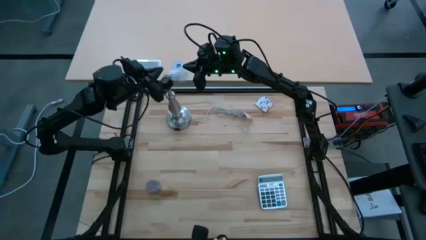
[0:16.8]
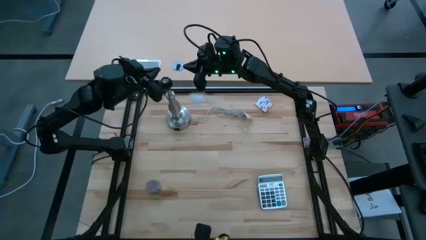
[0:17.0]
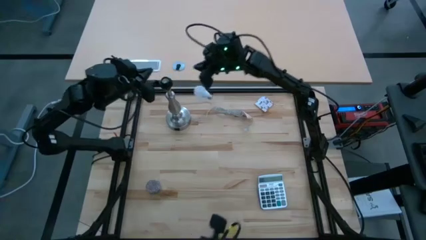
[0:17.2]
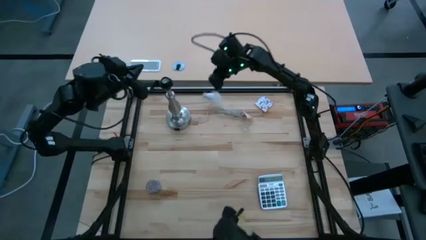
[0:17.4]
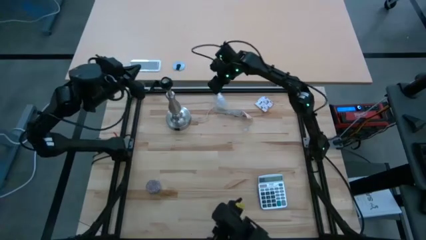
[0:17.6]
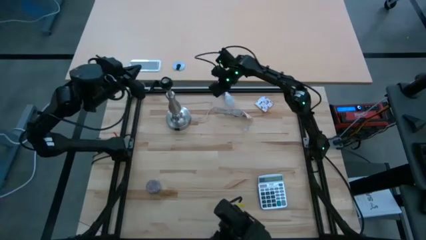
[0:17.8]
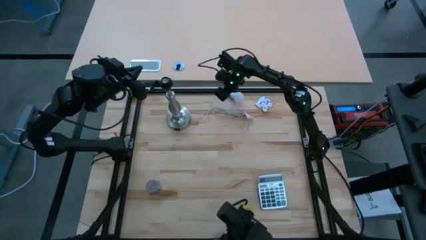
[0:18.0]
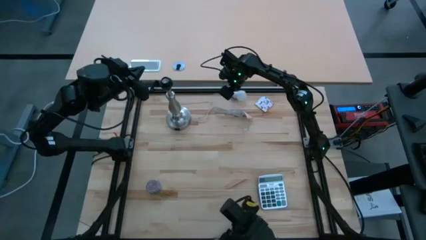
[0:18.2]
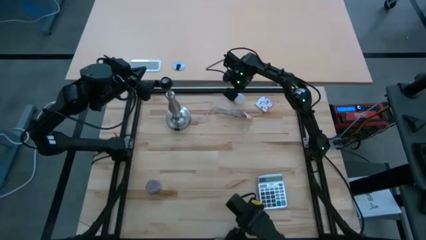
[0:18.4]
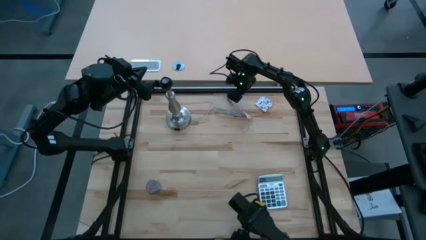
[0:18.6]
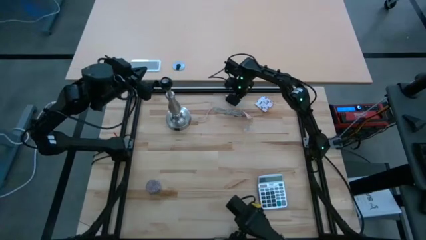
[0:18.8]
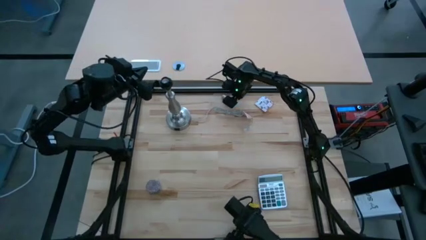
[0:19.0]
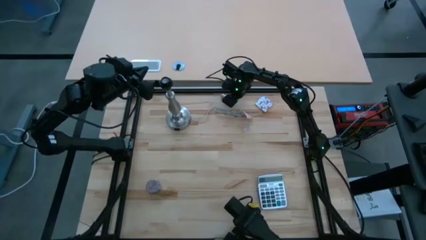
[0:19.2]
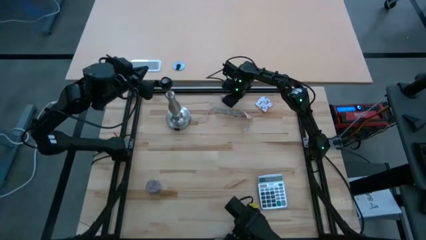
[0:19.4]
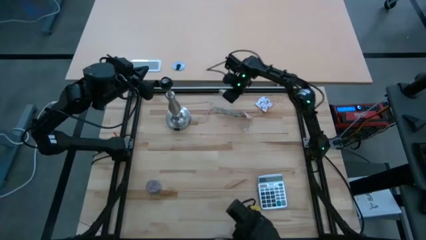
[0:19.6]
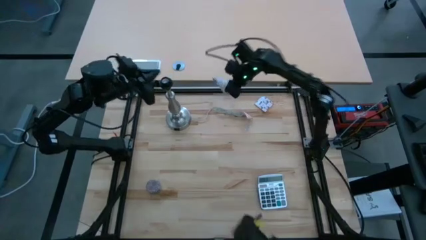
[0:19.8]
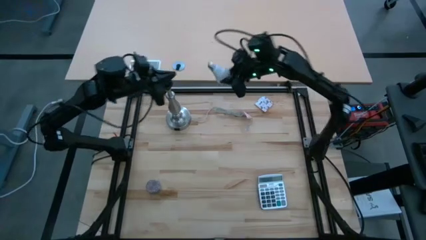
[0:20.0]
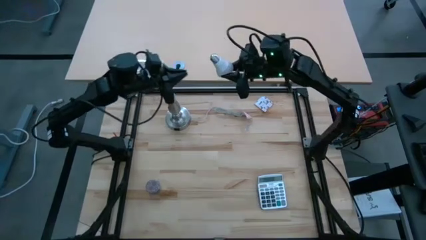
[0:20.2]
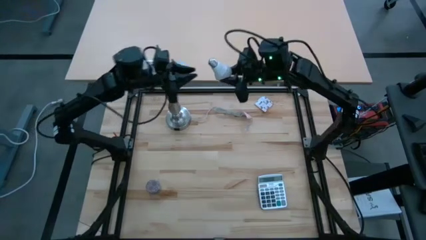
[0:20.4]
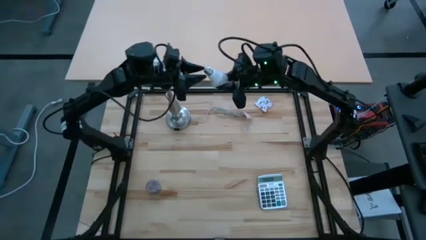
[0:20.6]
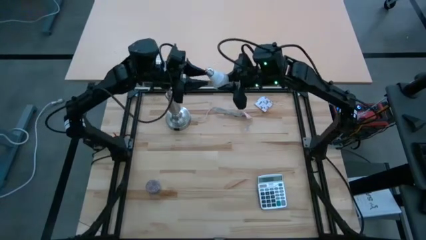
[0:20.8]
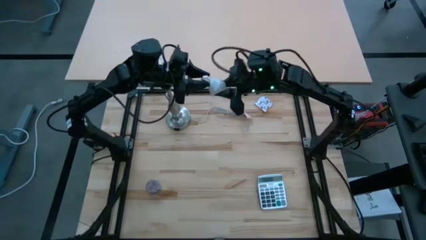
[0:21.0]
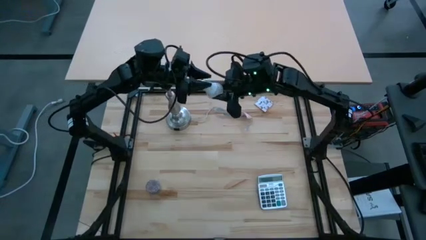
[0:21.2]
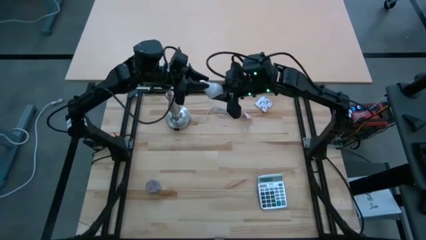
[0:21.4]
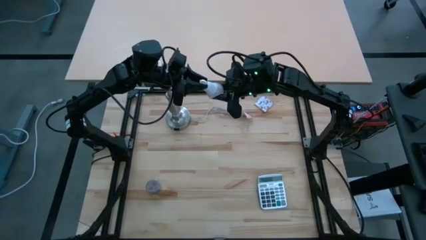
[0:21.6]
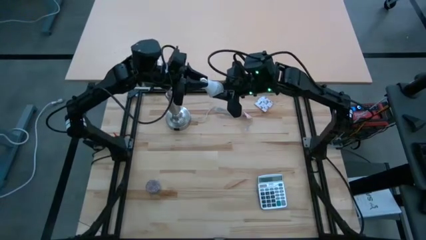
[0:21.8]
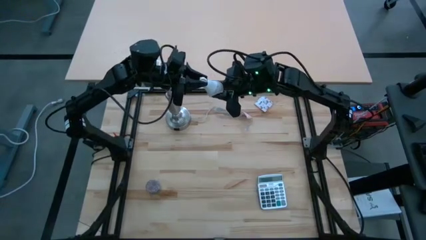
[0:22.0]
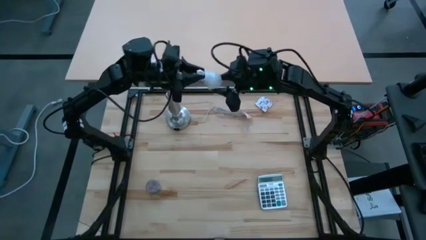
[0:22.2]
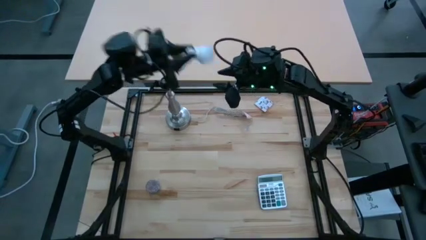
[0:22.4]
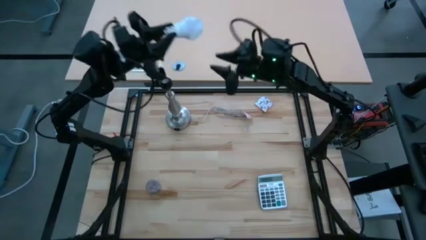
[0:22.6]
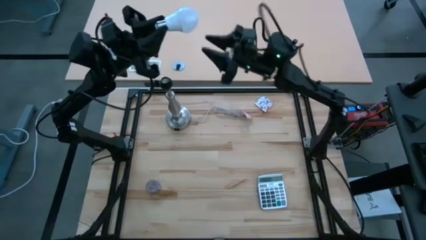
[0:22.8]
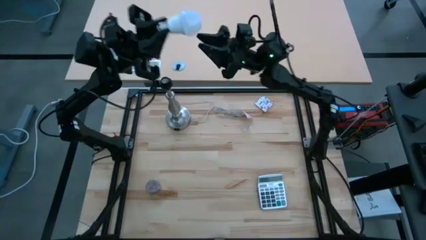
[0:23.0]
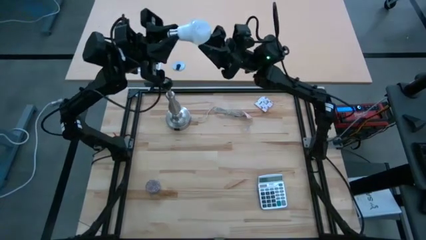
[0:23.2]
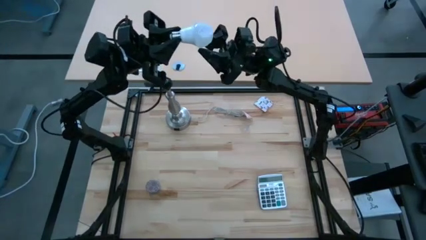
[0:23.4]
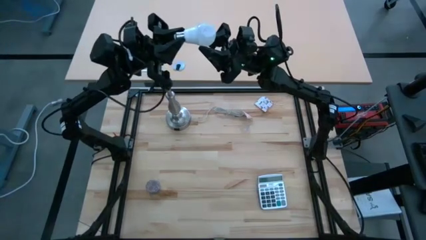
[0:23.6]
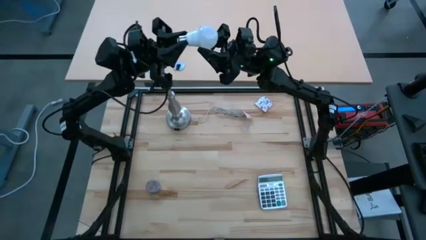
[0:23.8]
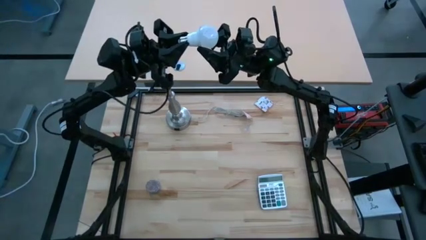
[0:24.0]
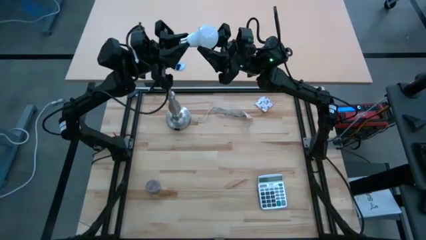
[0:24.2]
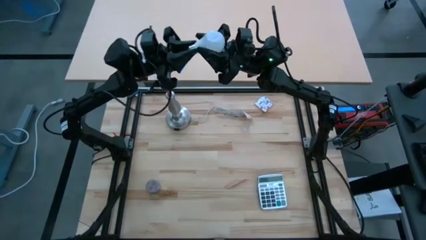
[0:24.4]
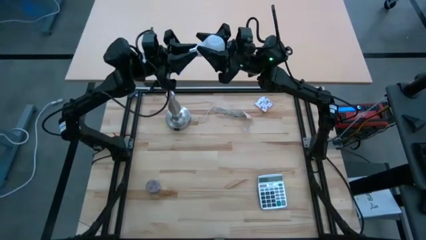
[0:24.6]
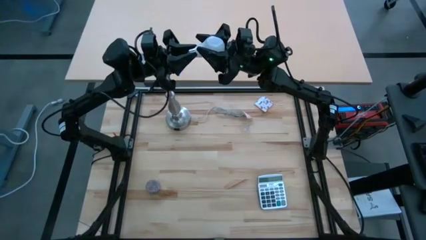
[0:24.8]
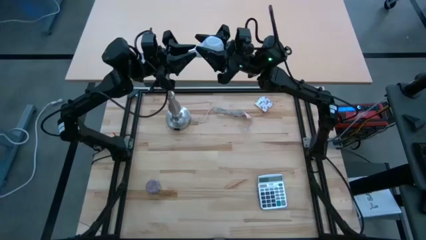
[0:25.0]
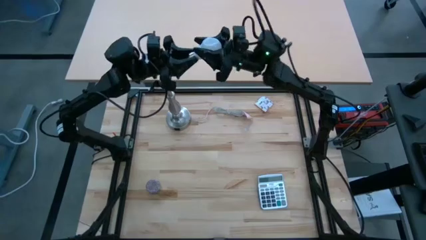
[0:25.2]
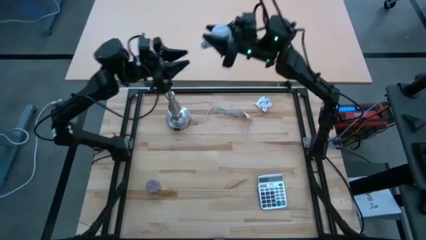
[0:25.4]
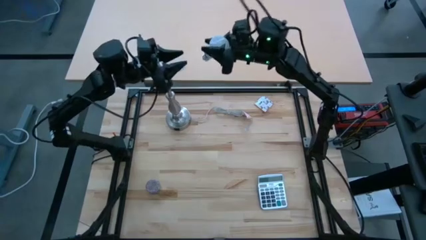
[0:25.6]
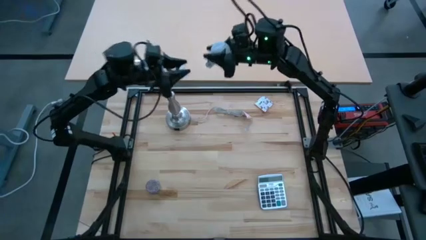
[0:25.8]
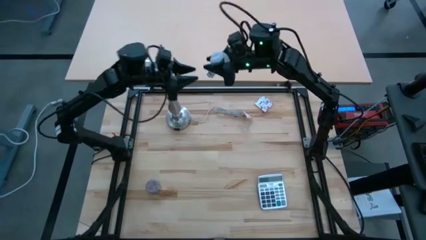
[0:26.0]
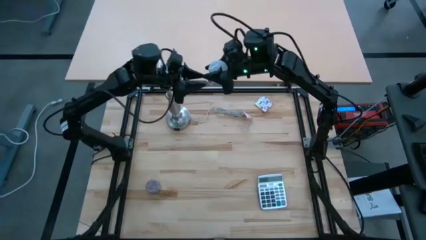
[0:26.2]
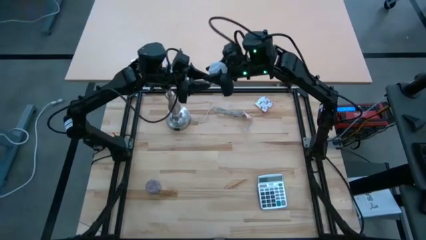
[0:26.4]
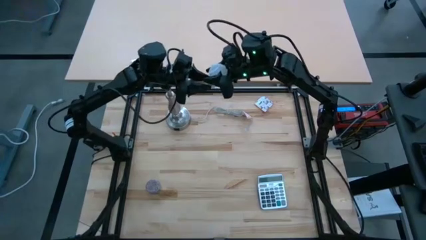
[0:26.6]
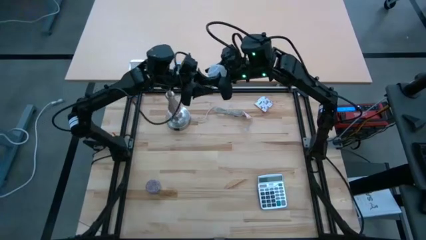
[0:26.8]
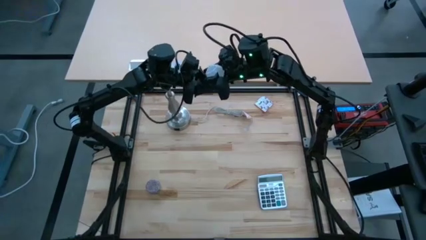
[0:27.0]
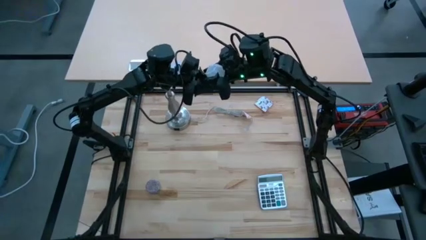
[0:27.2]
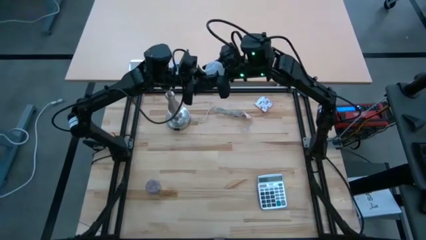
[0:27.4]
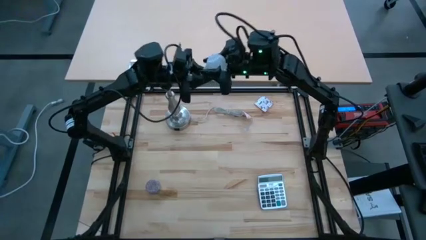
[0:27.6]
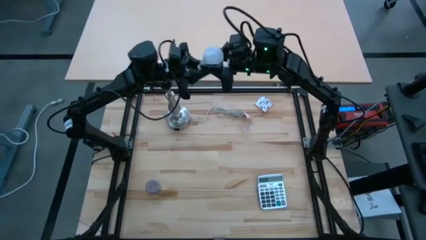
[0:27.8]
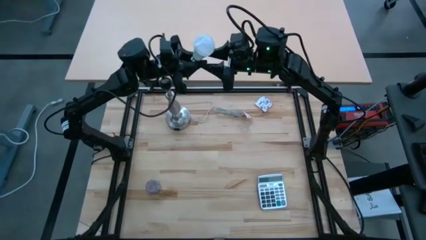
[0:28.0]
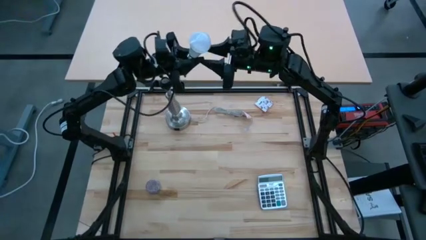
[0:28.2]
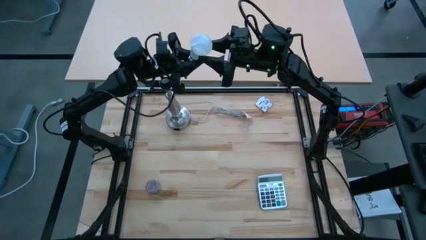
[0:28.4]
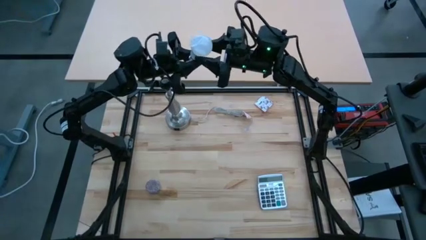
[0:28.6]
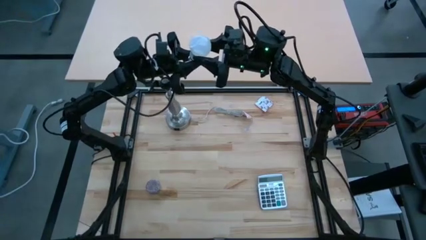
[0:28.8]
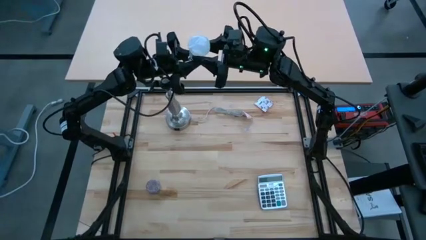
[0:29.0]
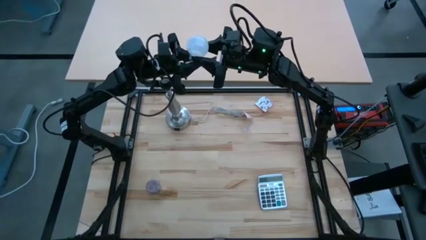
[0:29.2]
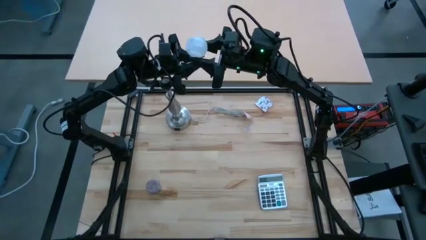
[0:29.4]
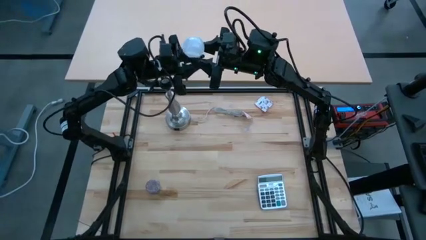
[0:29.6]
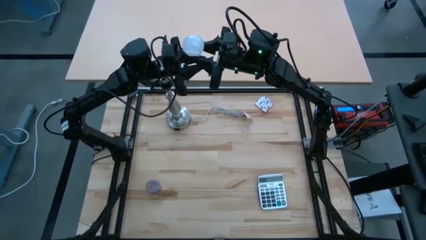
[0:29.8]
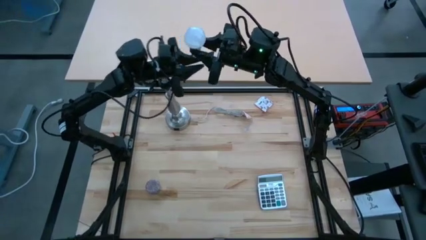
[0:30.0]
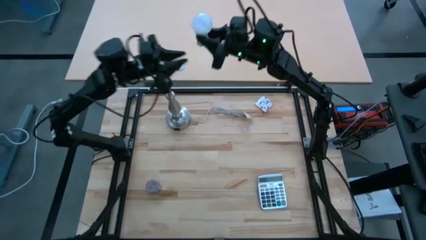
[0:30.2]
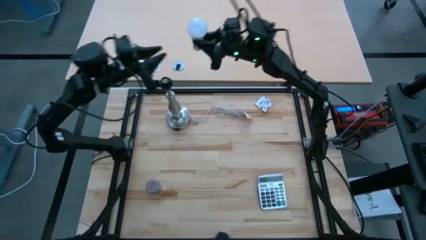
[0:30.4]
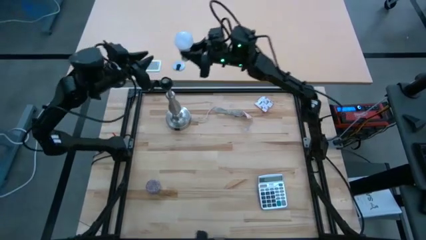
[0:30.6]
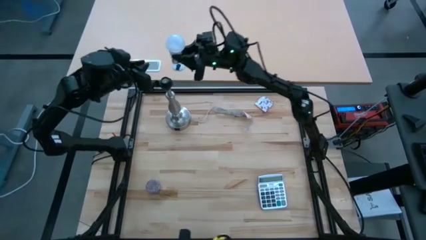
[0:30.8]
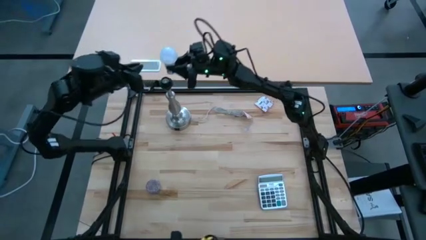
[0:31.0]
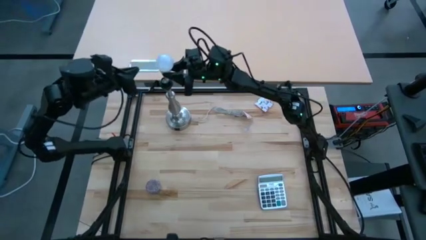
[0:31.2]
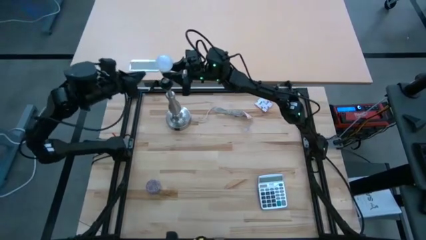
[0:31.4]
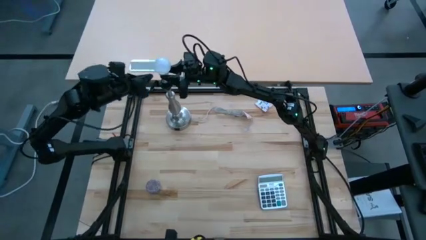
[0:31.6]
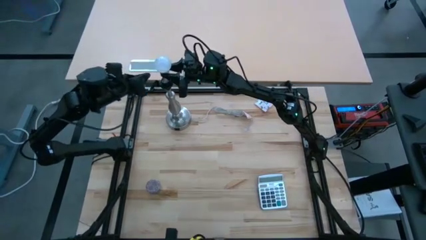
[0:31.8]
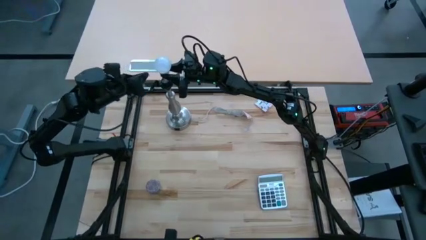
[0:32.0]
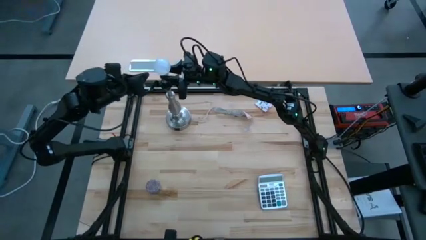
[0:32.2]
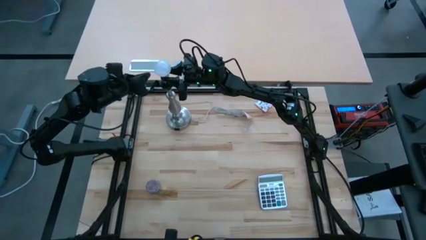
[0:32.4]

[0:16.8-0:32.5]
Task: Screw lightbulb
Insert the lightbulb into the lamp

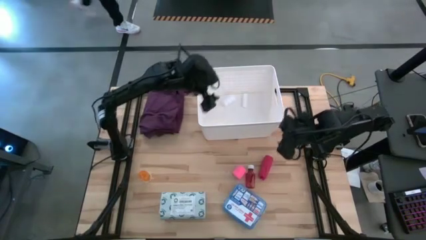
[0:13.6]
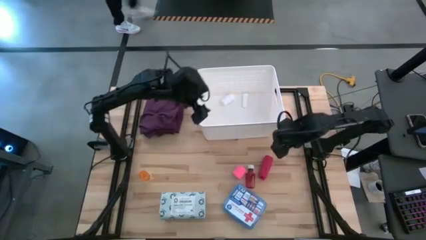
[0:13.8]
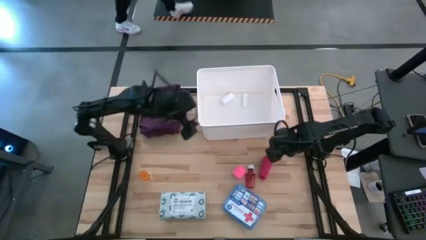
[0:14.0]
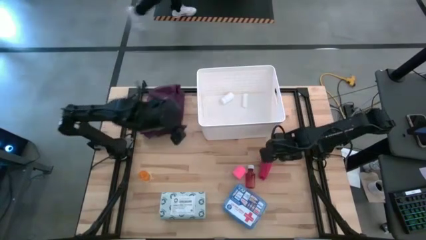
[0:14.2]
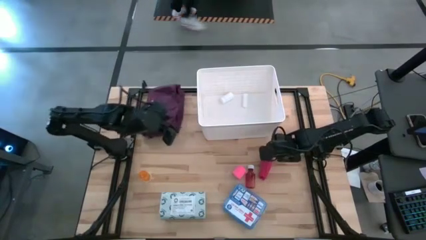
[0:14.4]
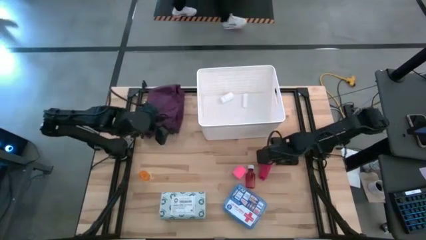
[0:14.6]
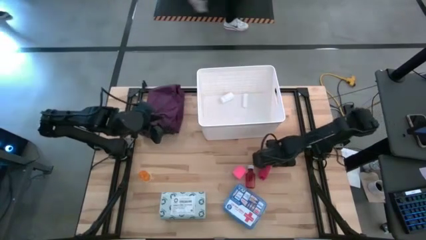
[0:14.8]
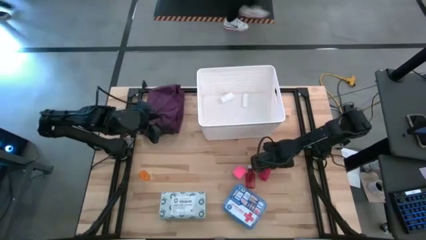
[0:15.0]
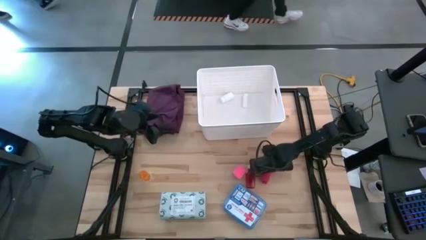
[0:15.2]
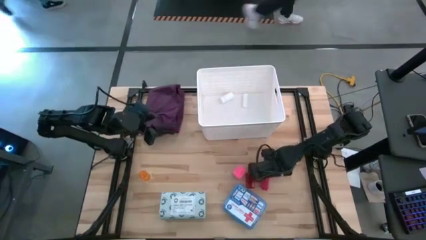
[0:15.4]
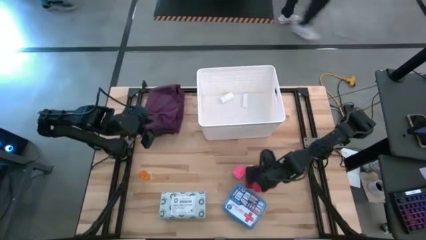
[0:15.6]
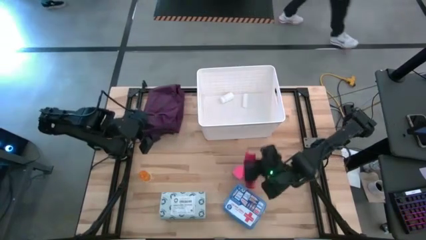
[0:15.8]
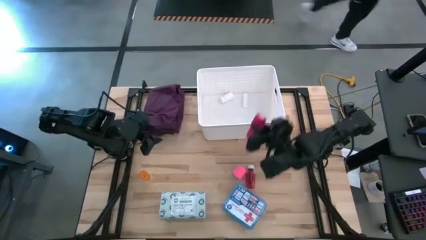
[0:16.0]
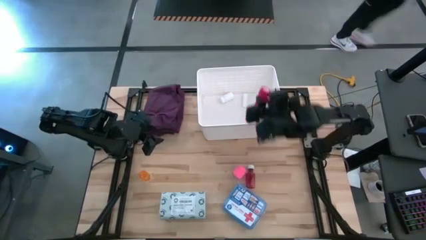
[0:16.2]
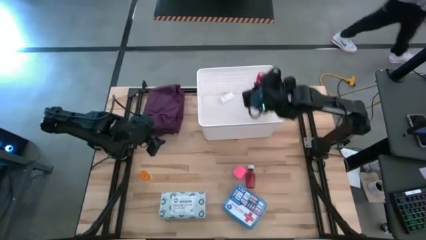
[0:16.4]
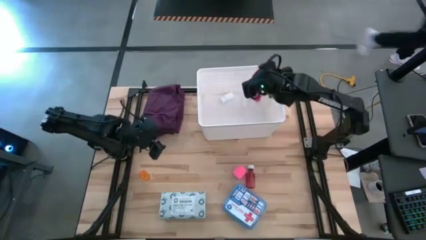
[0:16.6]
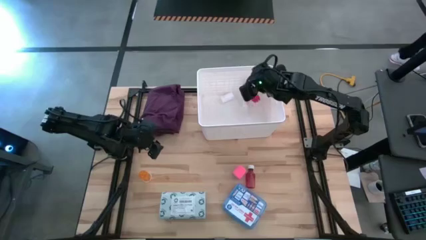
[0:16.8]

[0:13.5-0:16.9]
Task: Pick & place medical supplies in basket/bin
Put the red bandage into the bin
